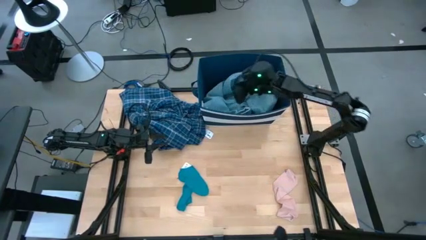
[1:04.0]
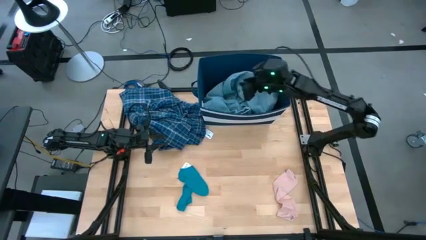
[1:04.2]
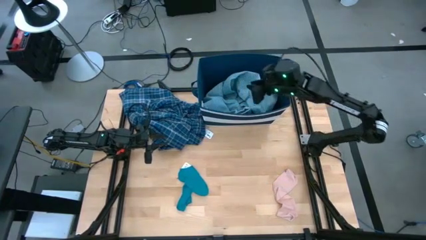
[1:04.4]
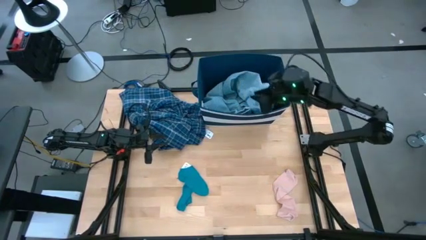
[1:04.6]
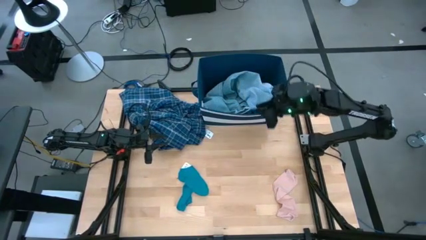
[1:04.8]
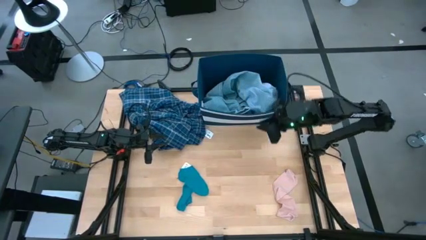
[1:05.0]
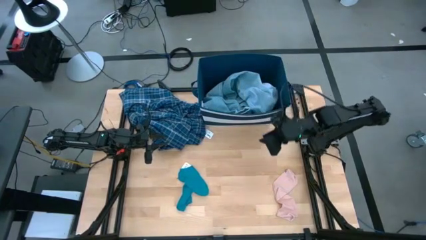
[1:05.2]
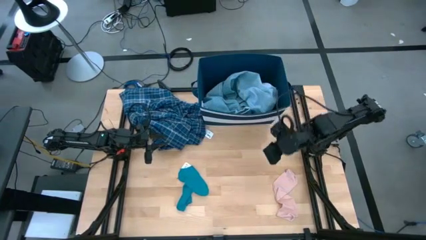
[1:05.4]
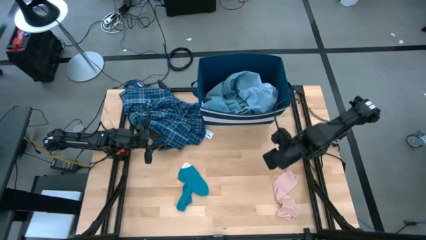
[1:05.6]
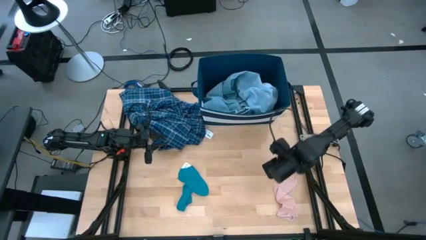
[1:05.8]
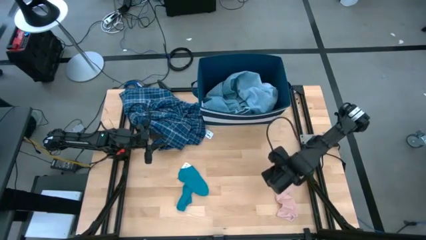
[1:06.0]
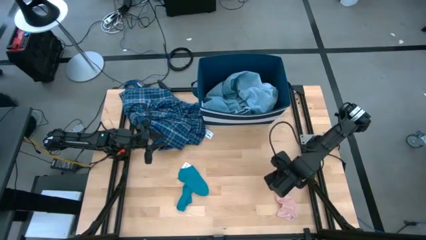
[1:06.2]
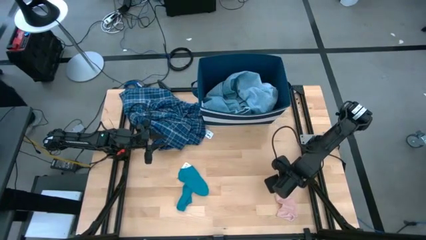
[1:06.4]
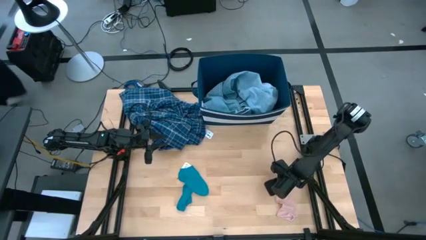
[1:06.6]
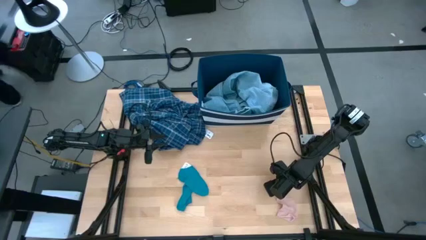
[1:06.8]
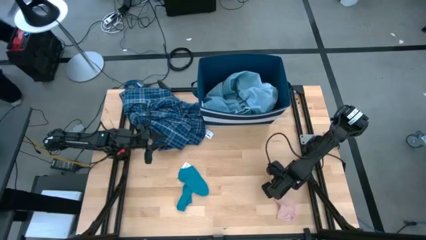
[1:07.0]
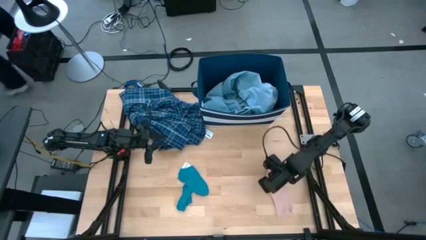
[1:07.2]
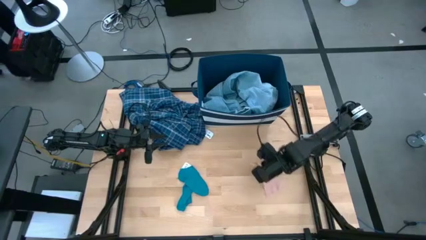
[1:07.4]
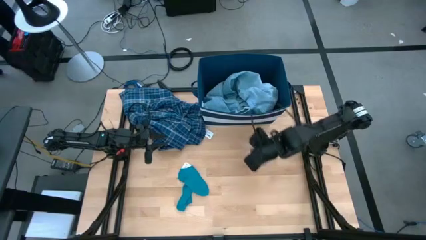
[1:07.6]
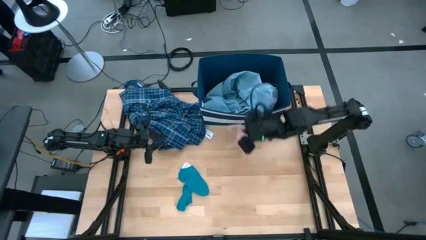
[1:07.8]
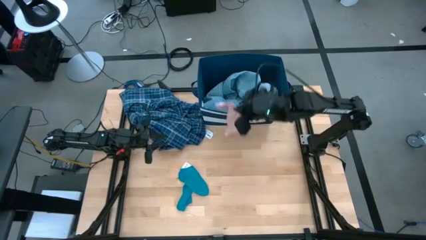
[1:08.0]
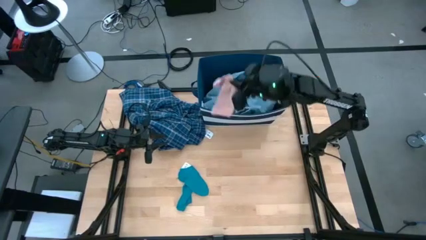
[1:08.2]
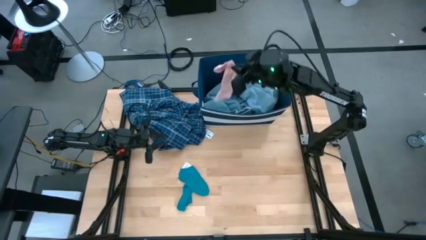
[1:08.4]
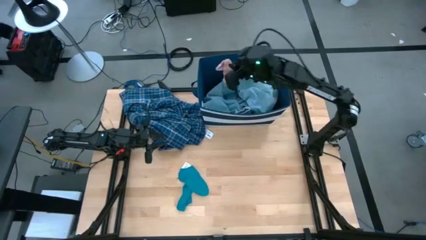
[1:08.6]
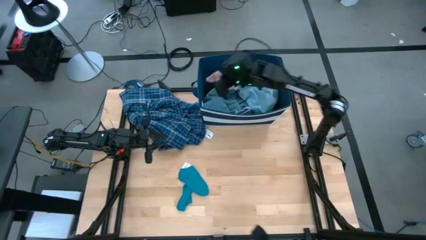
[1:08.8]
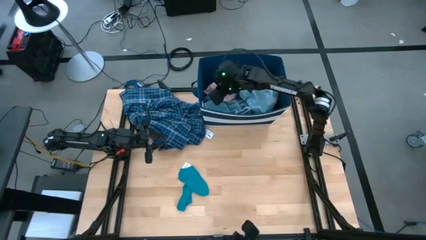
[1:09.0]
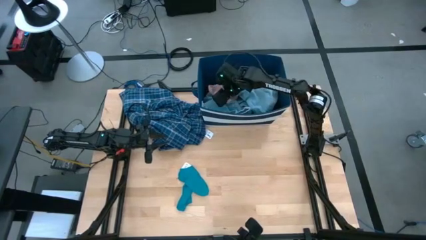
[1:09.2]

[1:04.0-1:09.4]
Task: Sort clothes
Put the pink sock into the blue laundry bin

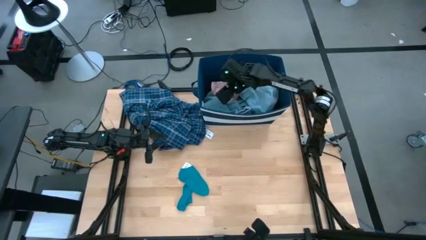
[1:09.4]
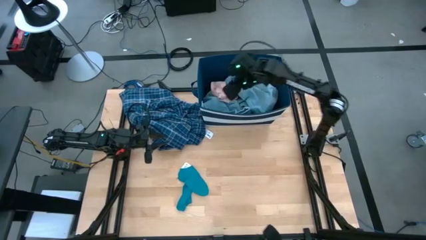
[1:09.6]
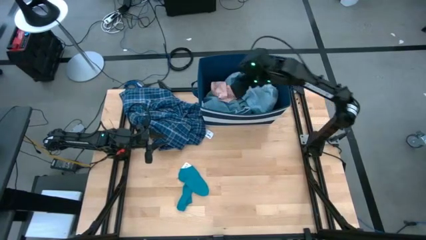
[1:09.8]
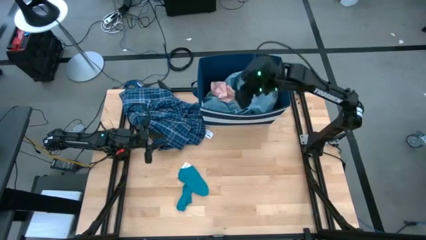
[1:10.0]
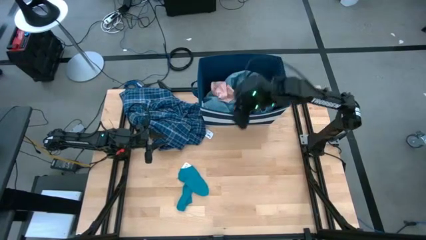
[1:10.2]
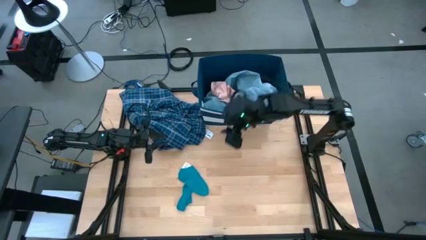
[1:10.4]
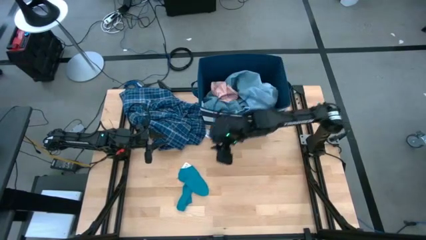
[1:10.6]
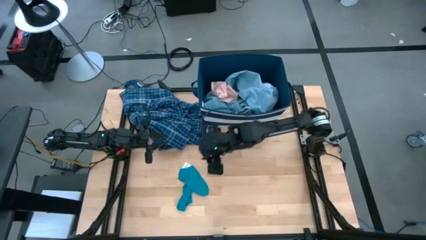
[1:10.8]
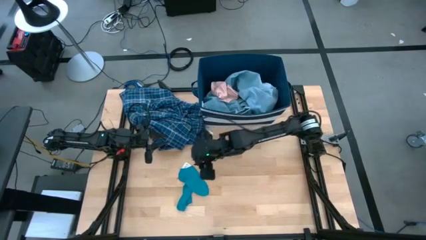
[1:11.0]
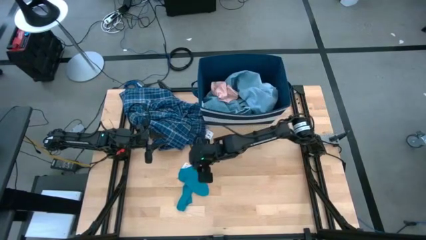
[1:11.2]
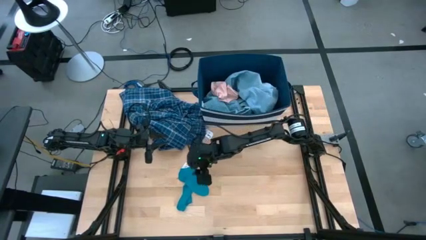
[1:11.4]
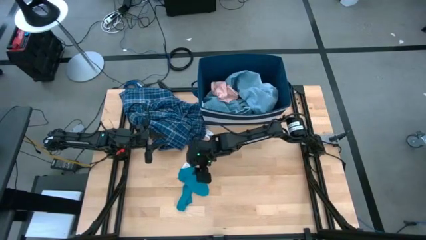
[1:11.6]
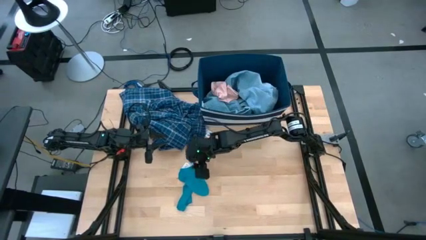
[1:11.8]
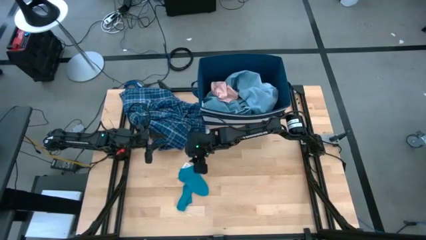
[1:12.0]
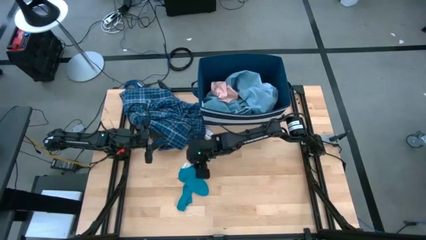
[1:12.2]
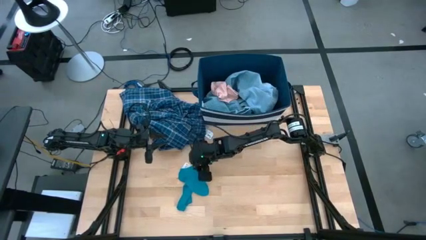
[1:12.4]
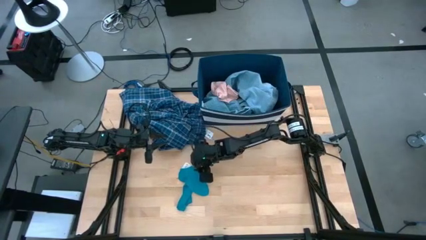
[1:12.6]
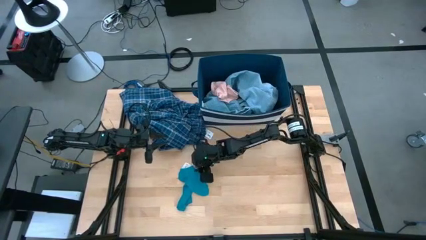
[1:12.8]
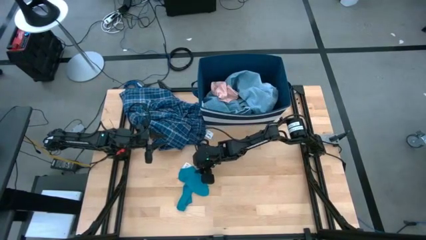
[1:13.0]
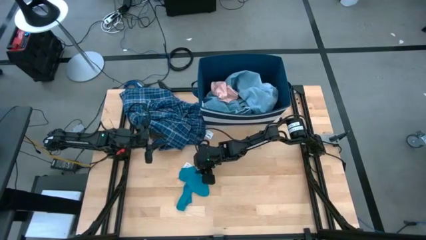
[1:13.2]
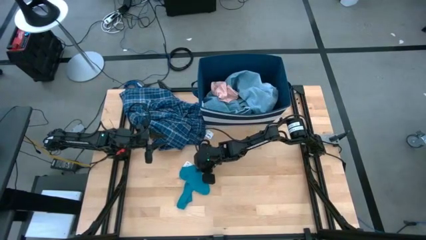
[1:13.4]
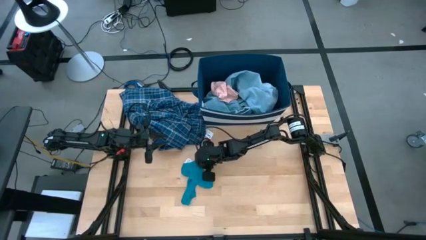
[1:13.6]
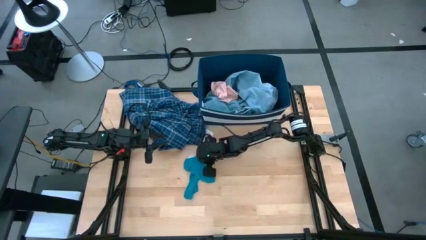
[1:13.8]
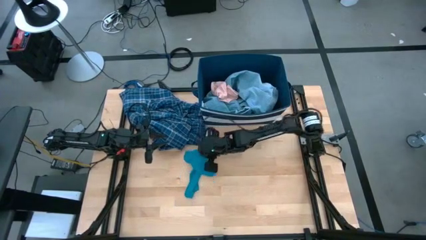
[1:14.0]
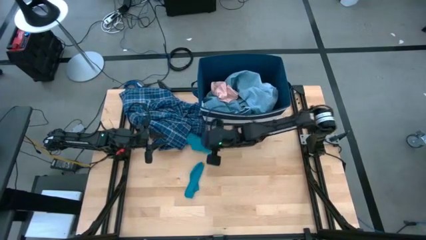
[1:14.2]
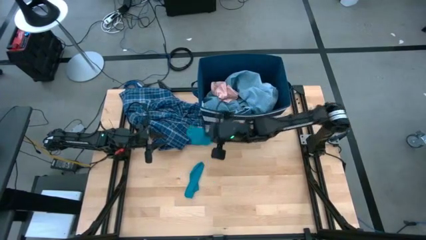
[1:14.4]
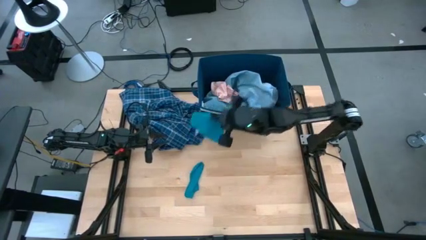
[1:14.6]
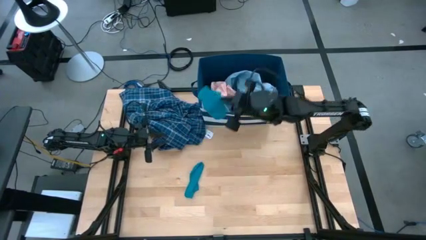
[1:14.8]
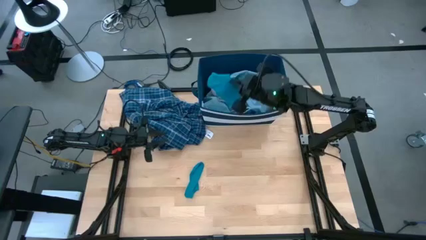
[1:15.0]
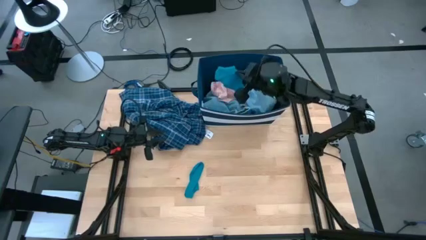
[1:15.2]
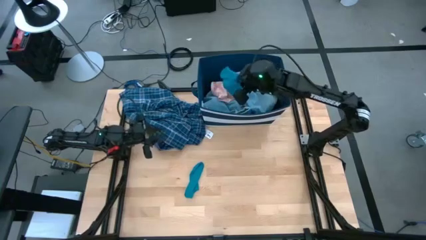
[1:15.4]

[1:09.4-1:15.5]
Put the top blue sock into the blue laundry bin
